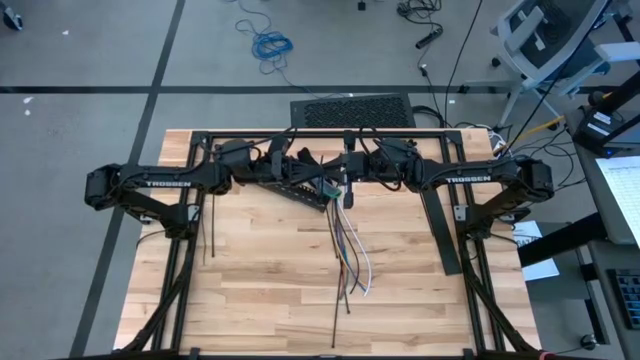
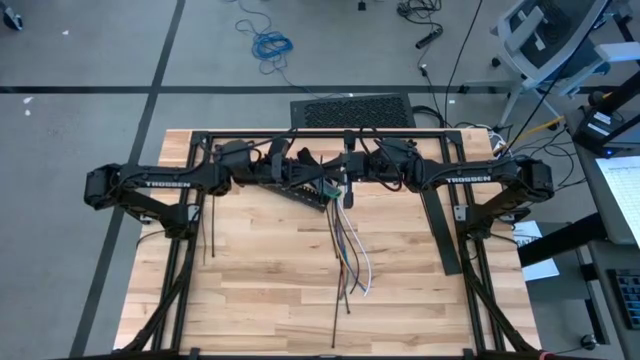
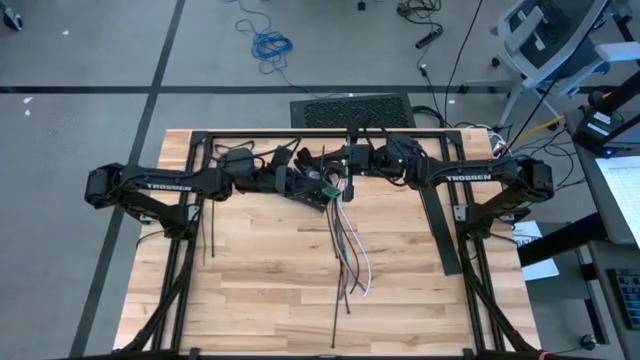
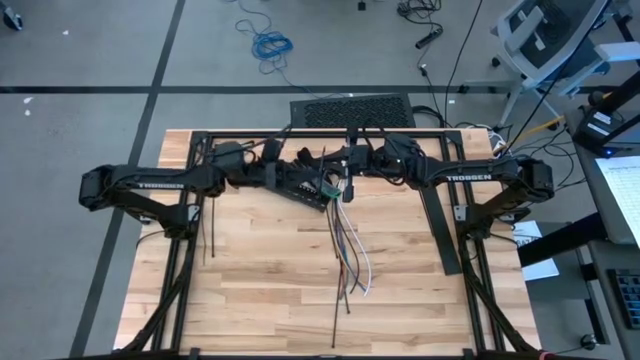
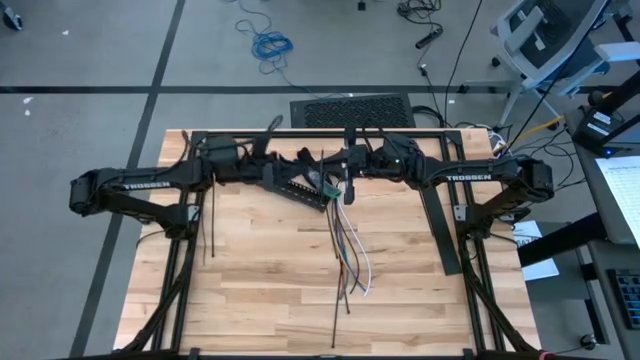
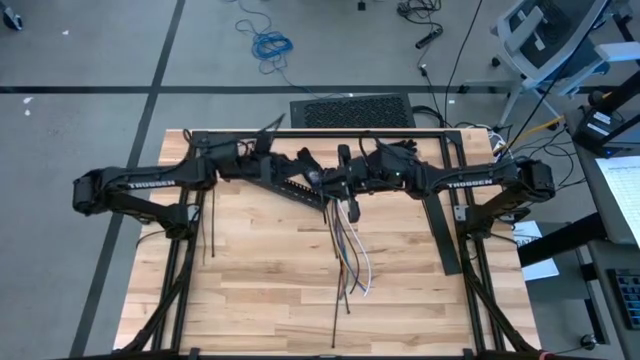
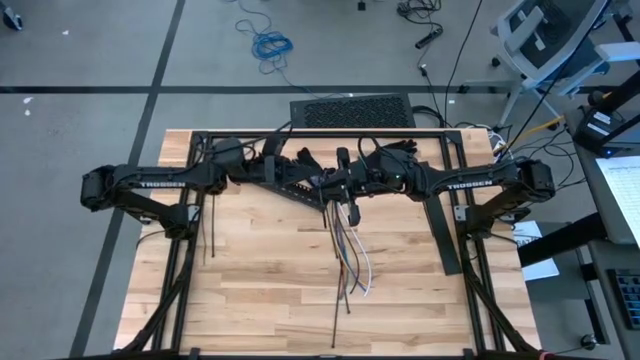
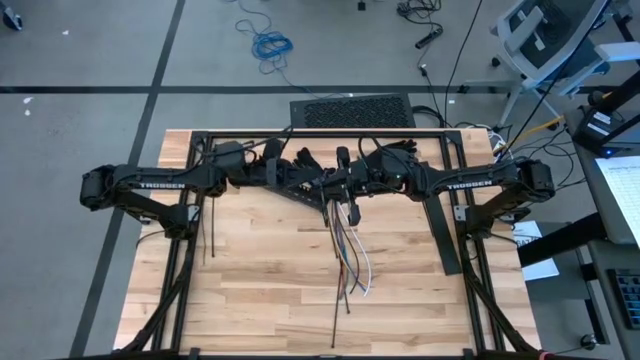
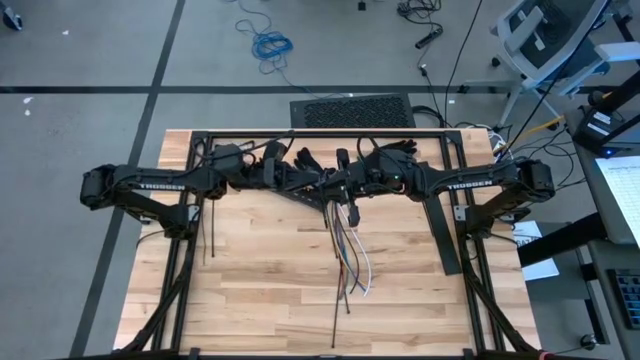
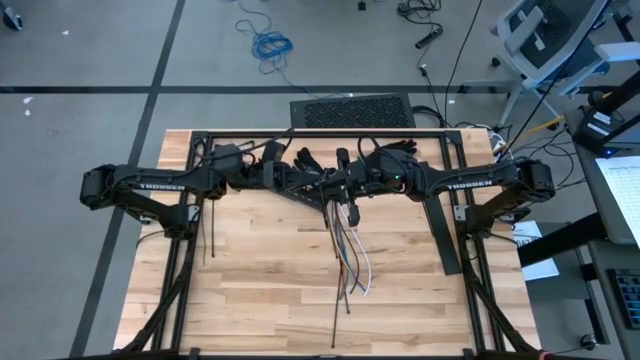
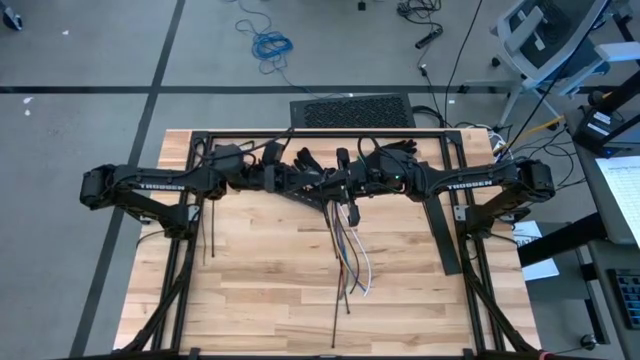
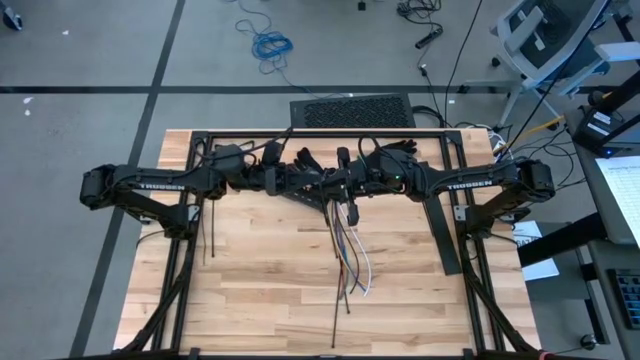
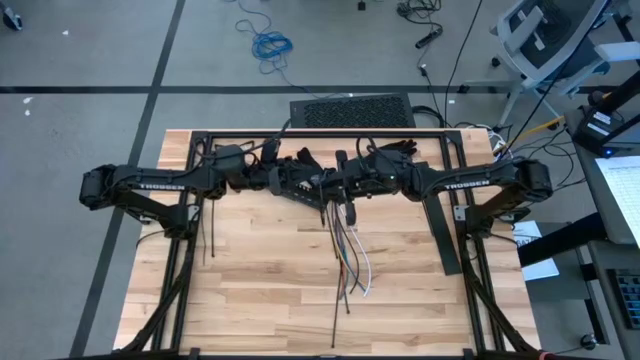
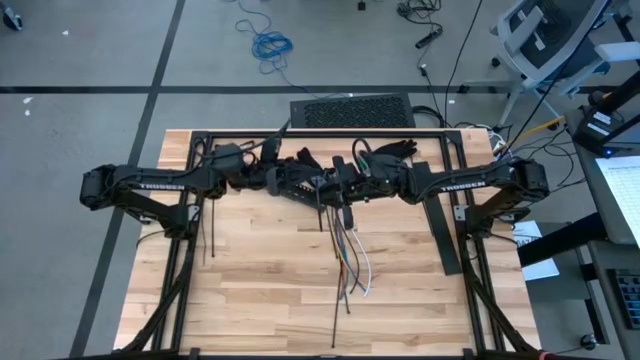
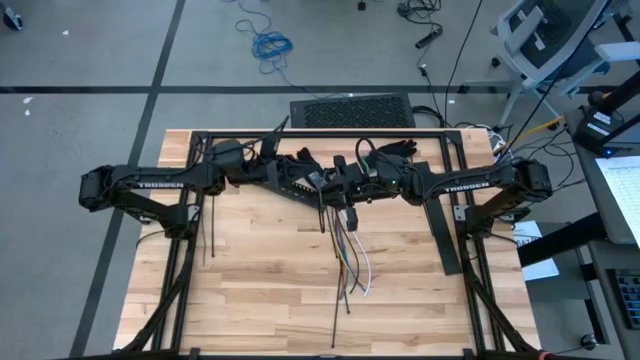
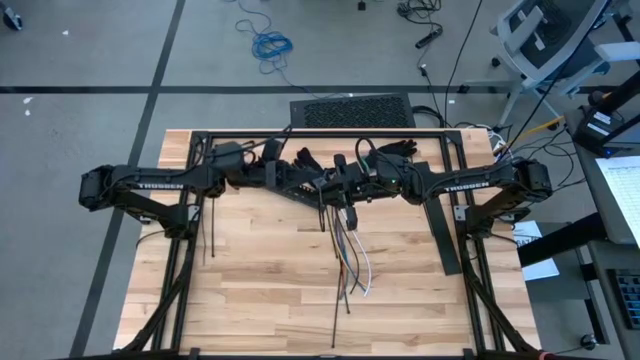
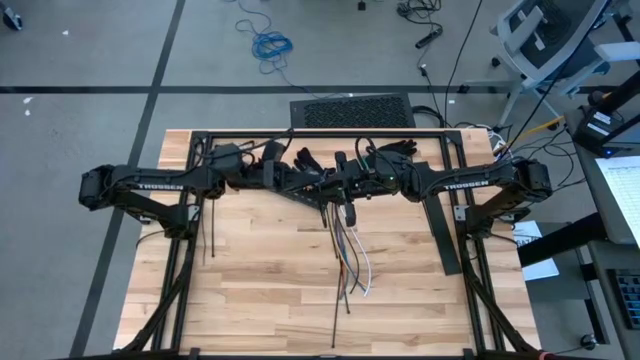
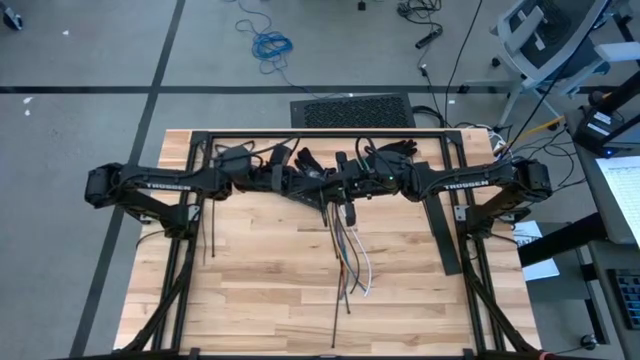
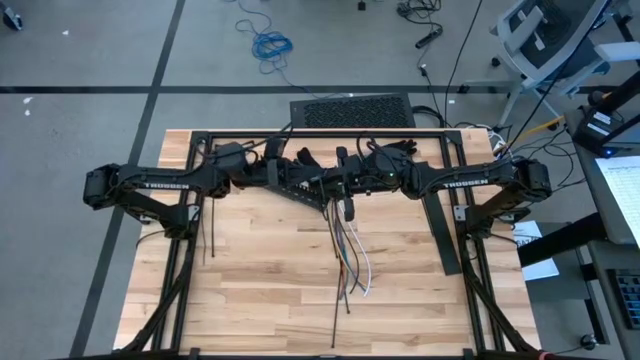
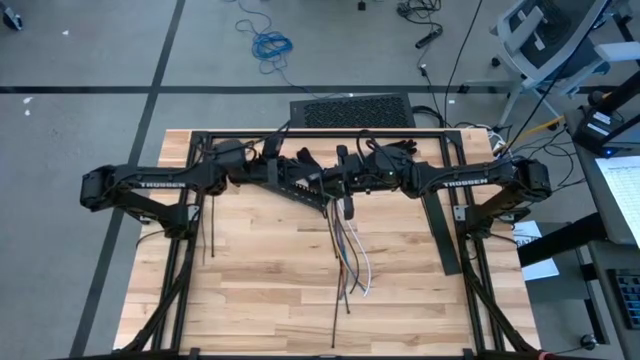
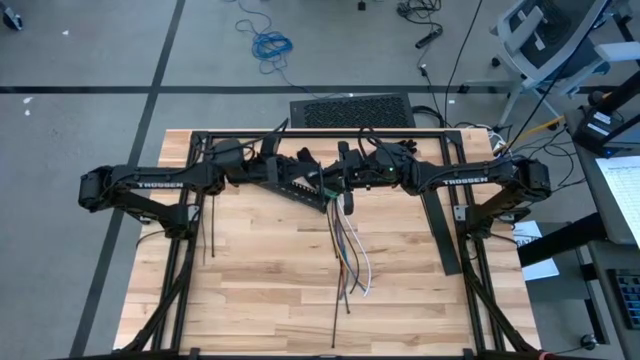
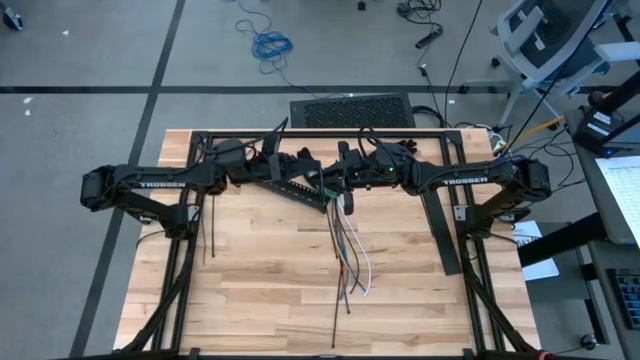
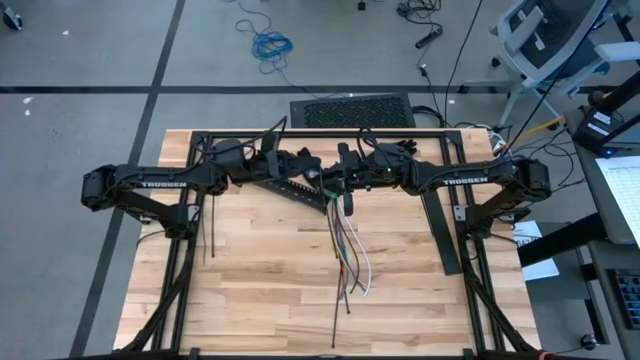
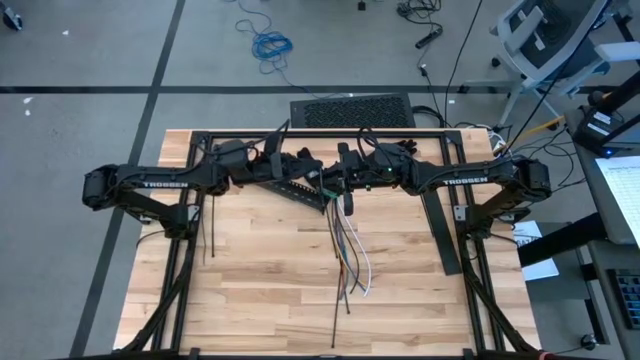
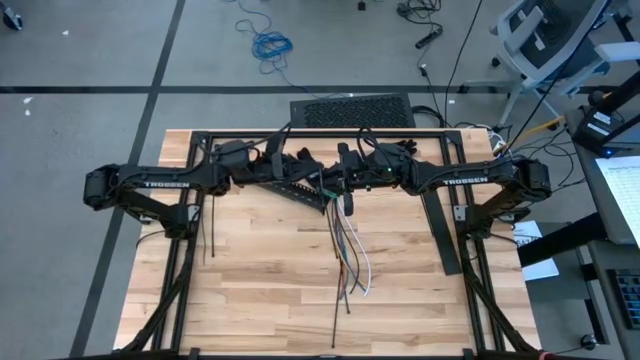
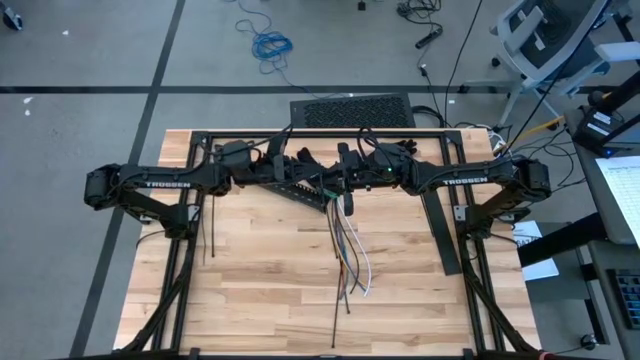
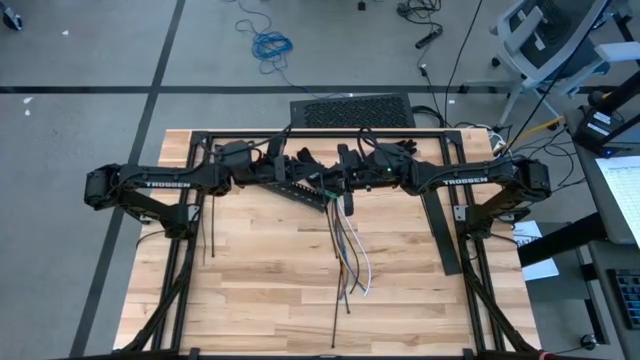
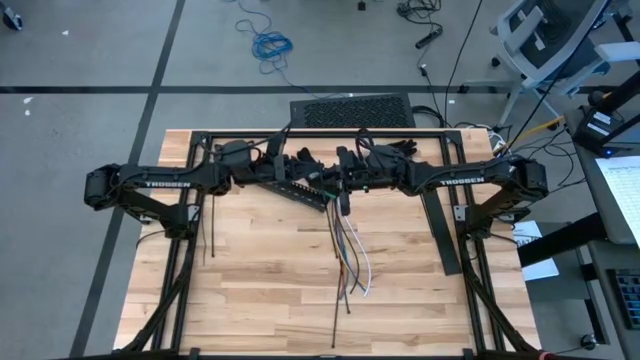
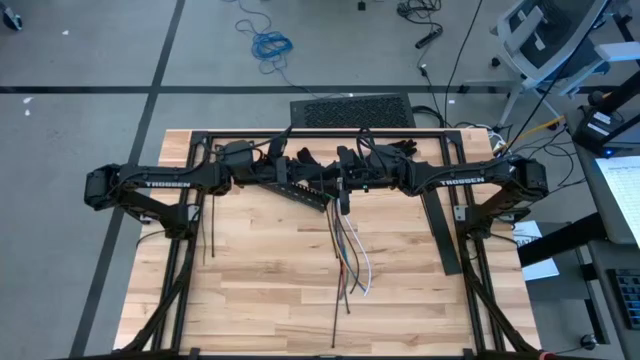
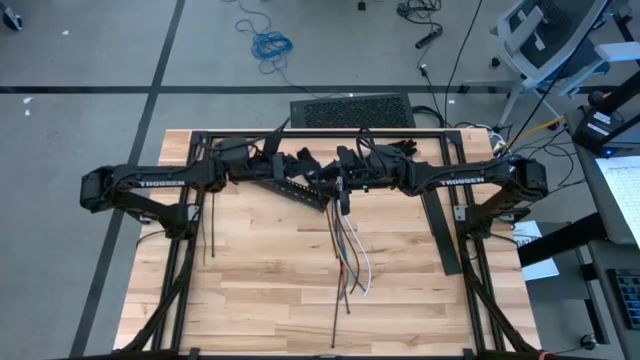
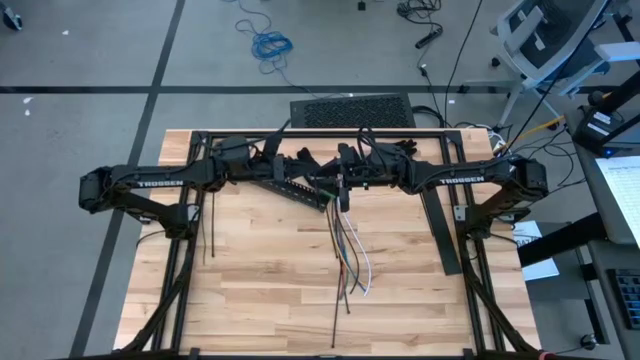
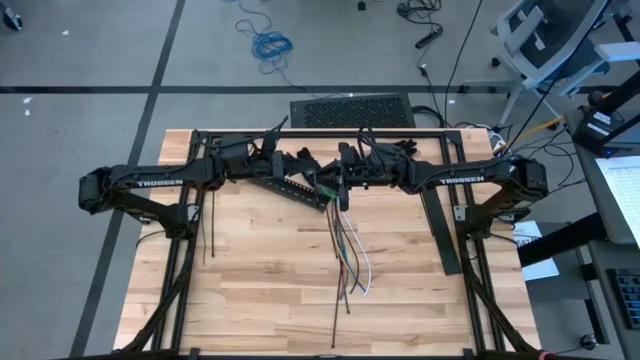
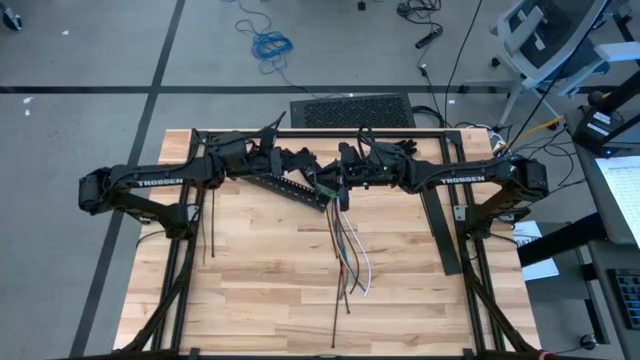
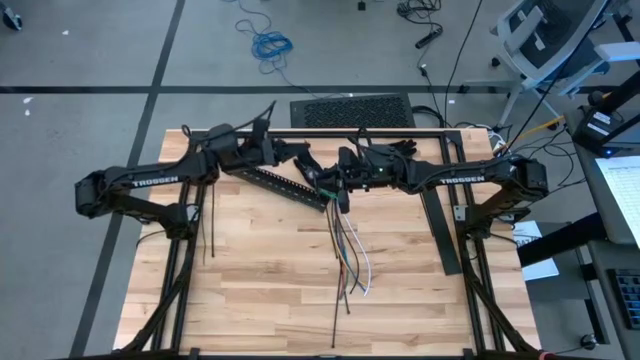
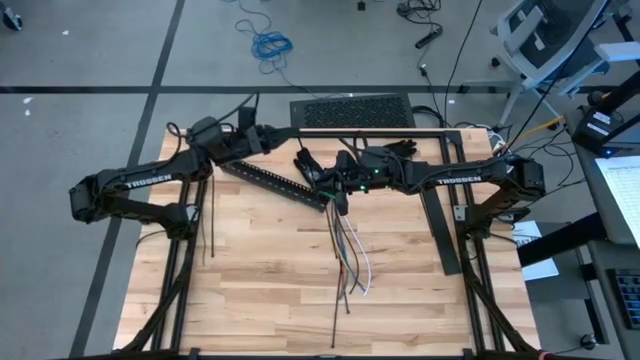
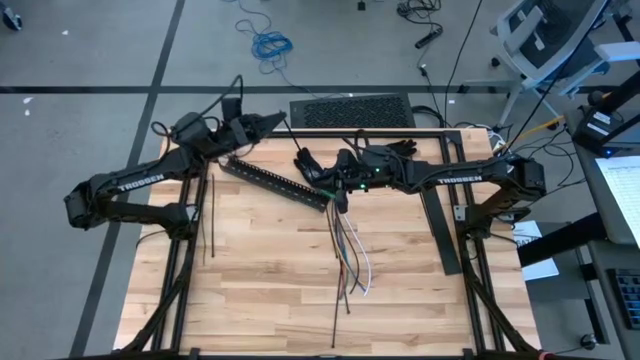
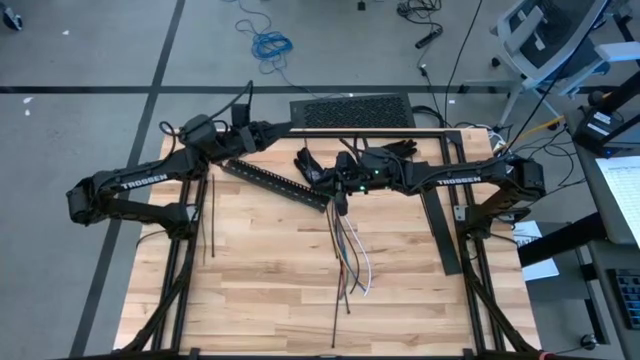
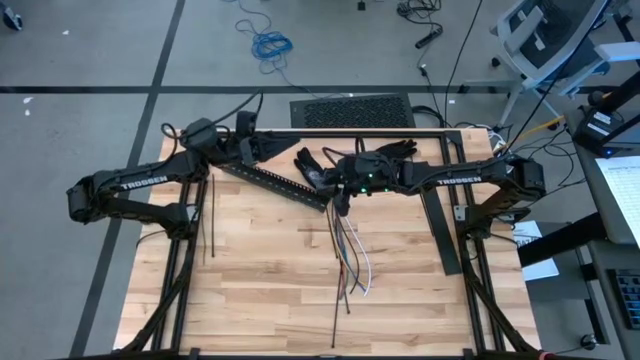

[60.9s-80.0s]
Task: Ziptie cables
Insert the black zip tie into the lock head

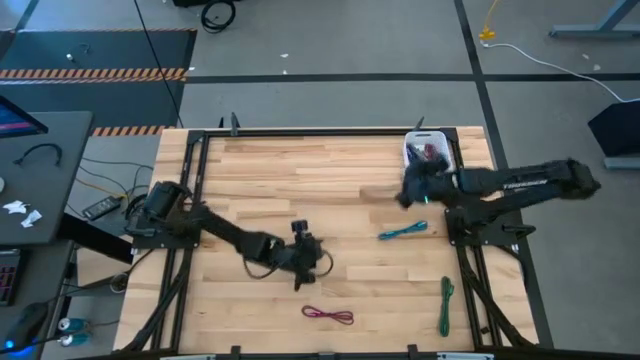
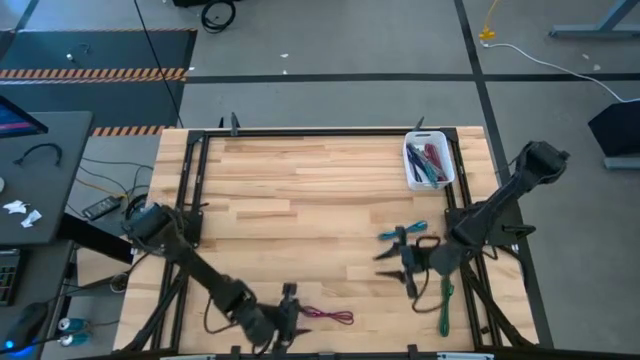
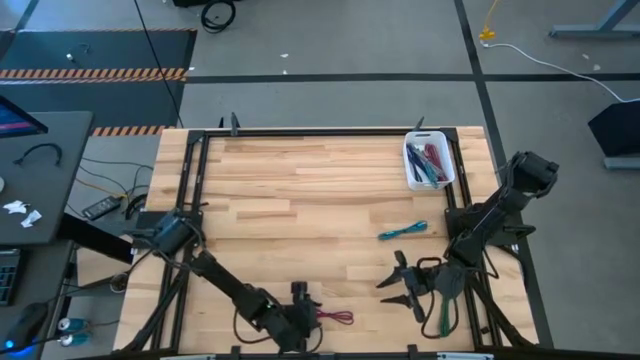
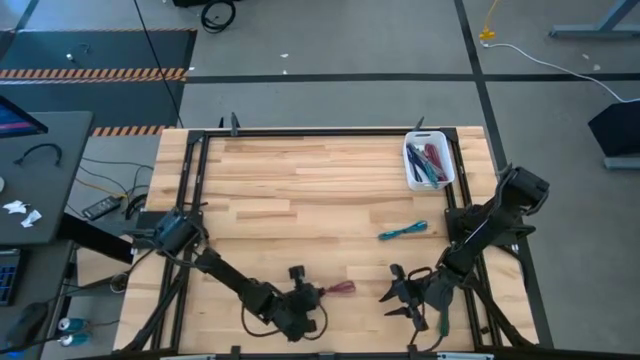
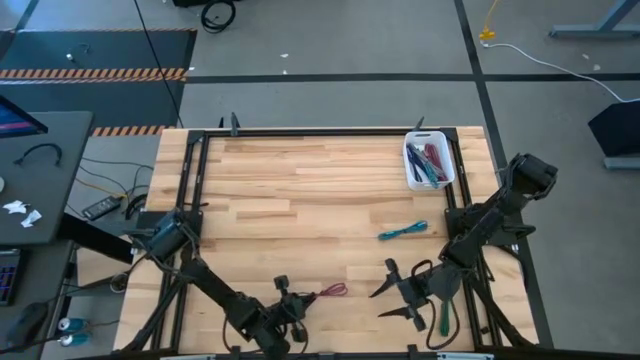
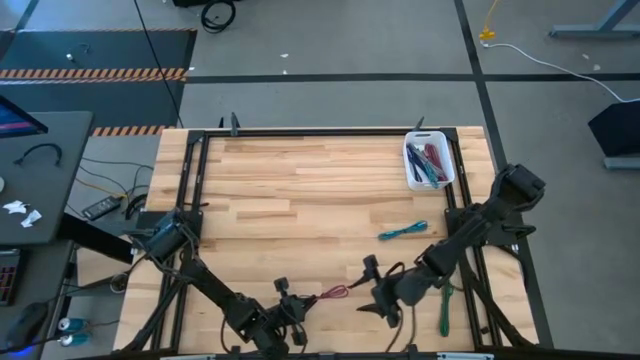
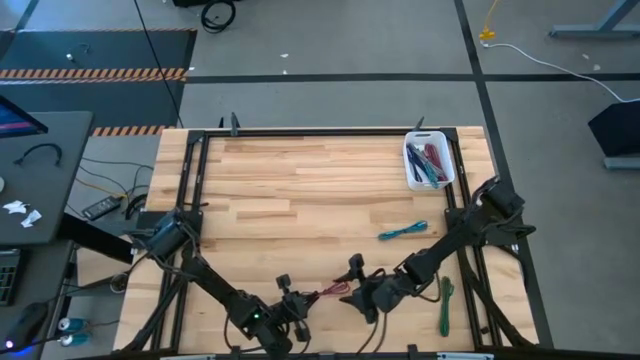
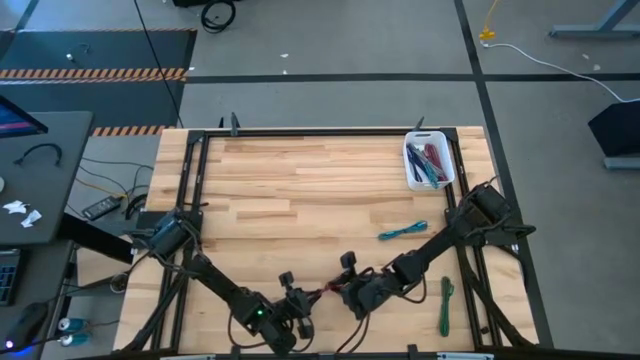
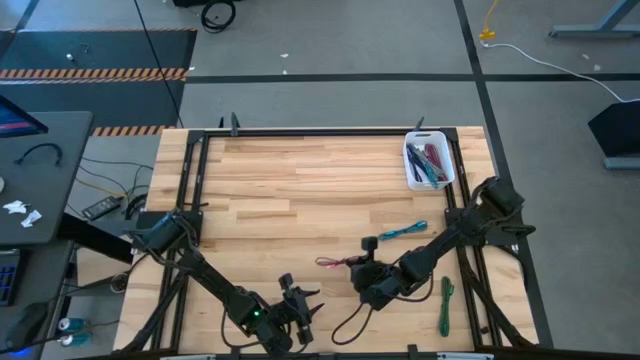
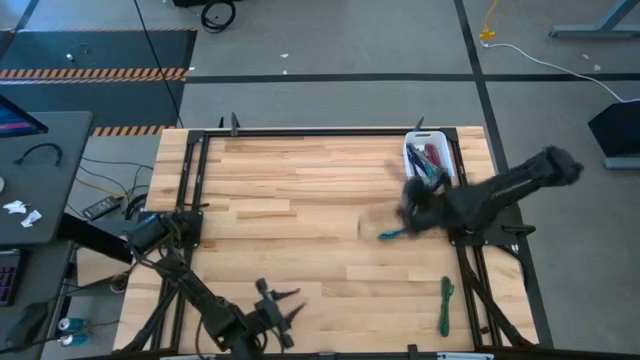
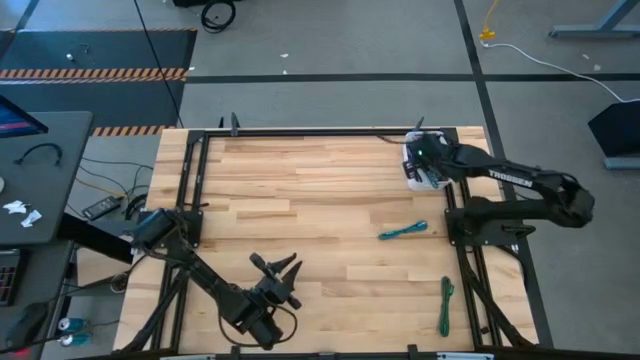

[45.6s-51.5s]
Task: Pick and place USB-C Cables
Put the black pink charger cable into the bin
